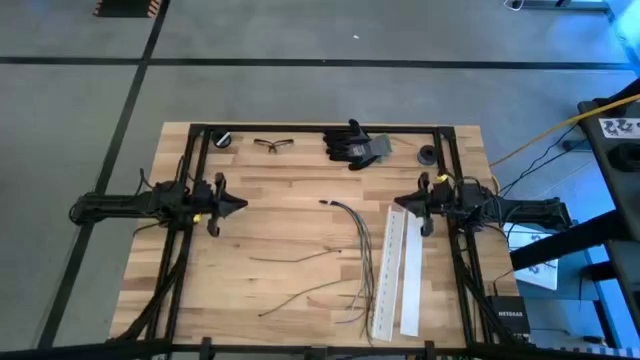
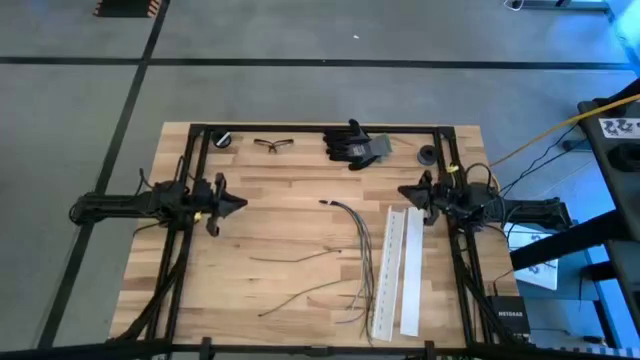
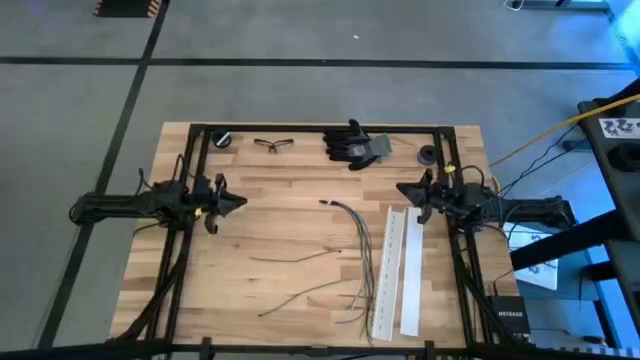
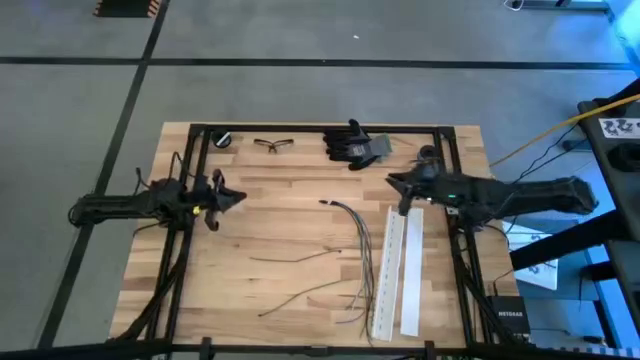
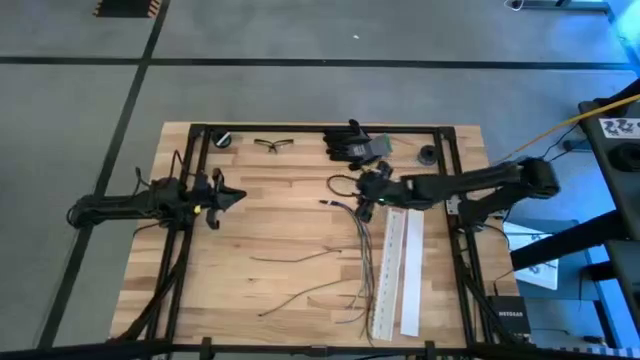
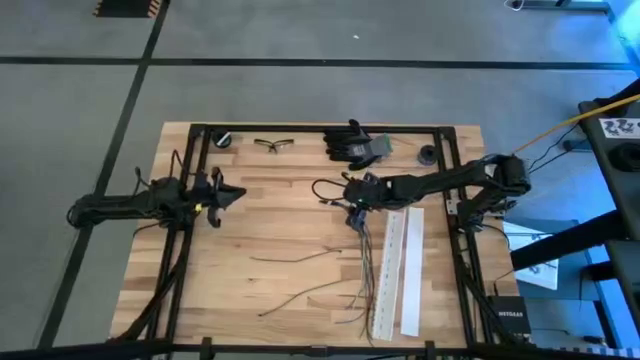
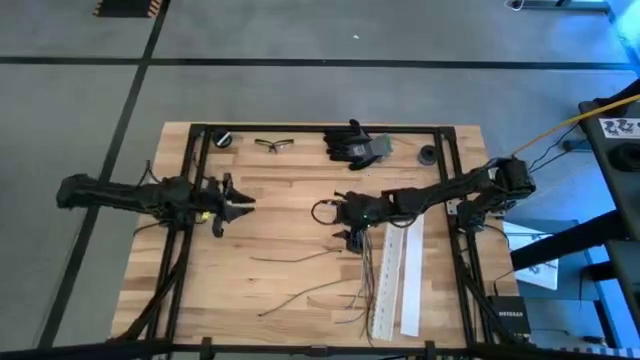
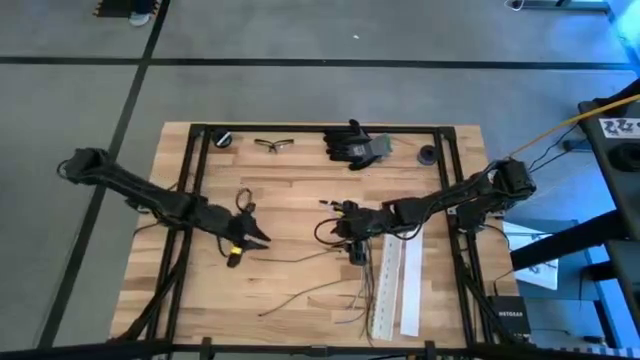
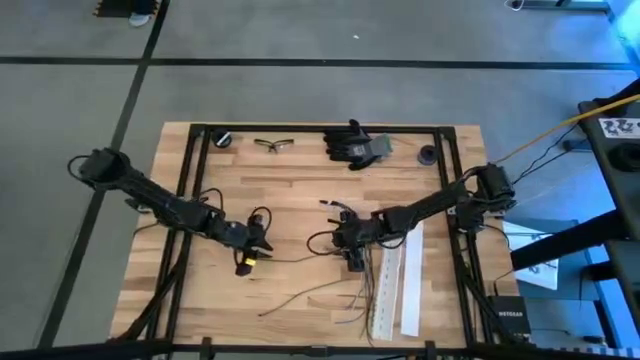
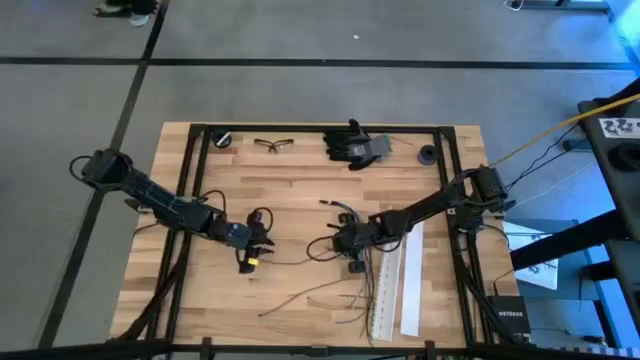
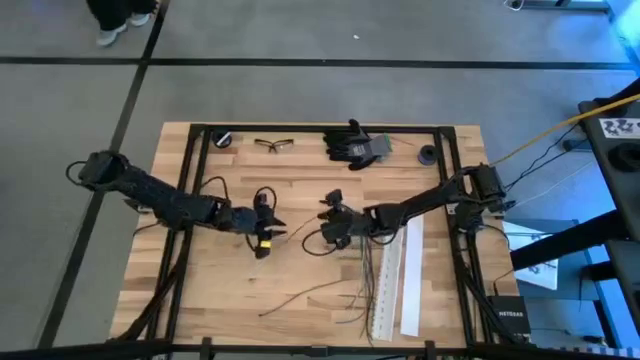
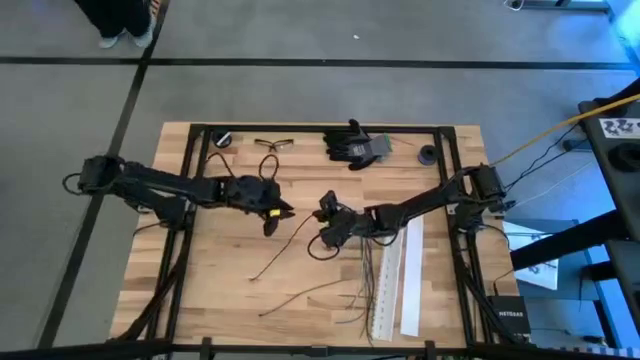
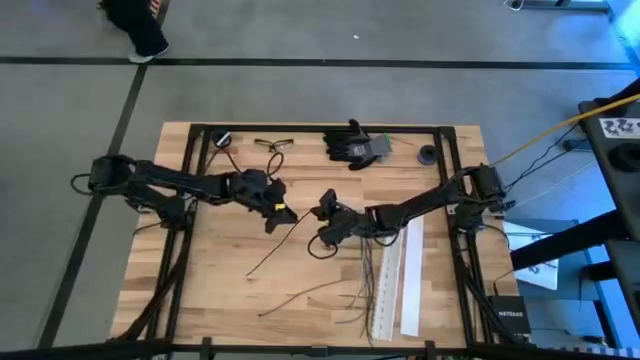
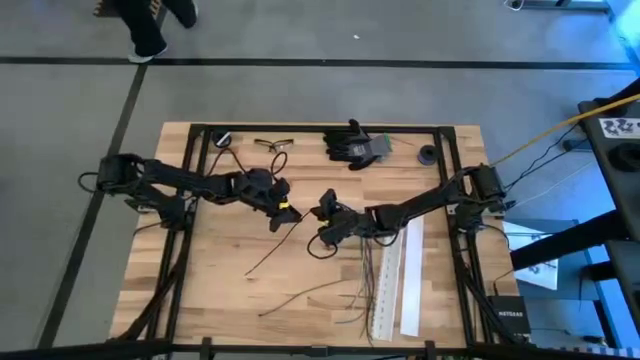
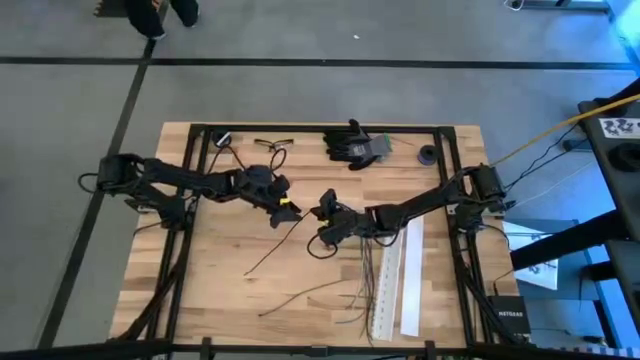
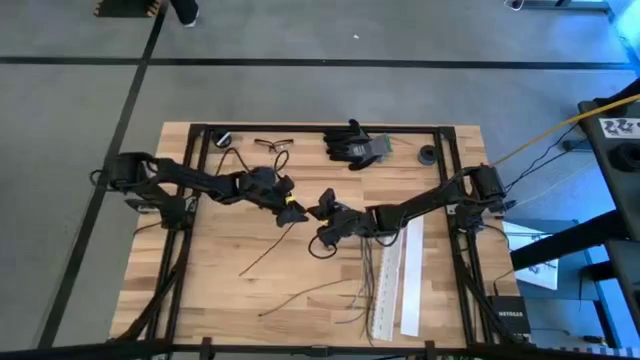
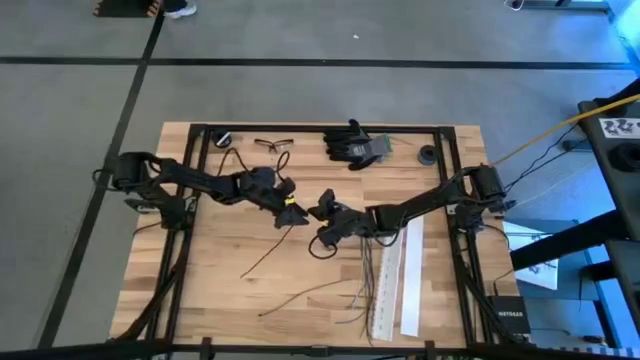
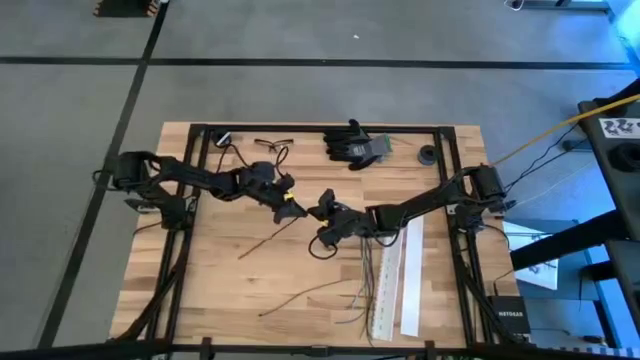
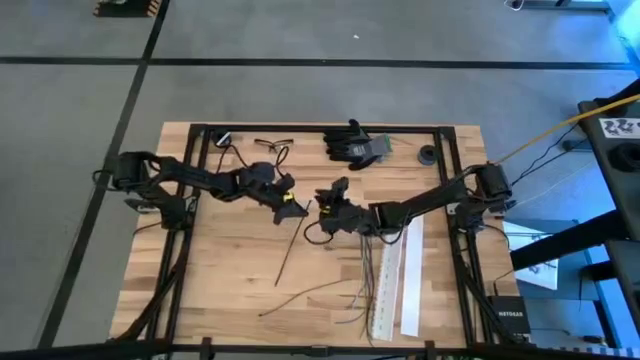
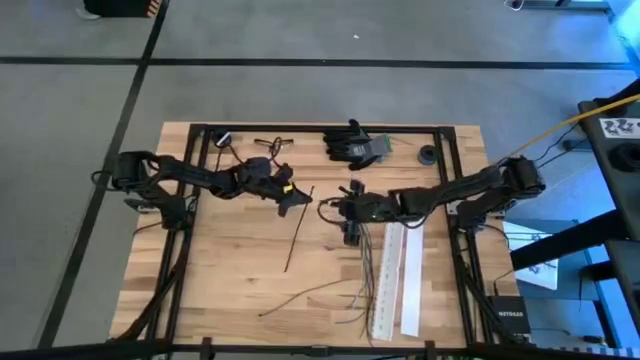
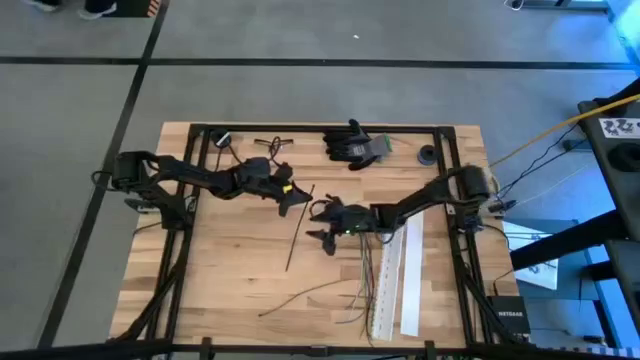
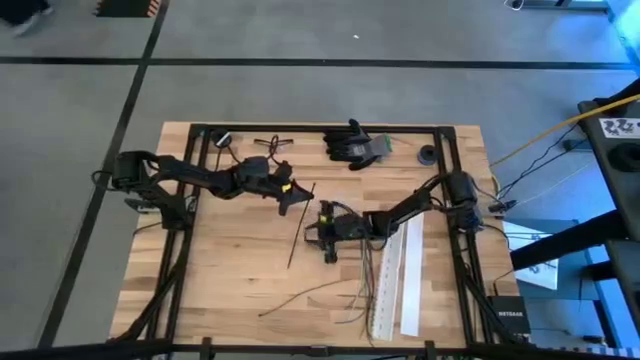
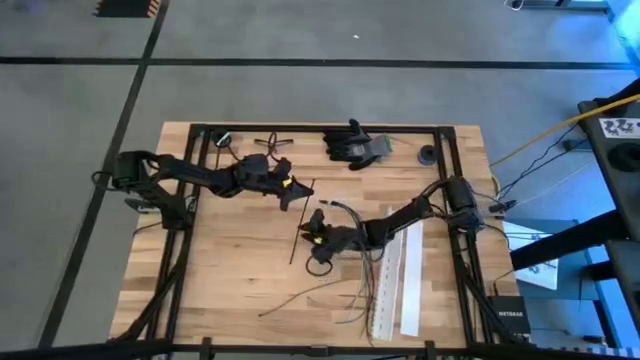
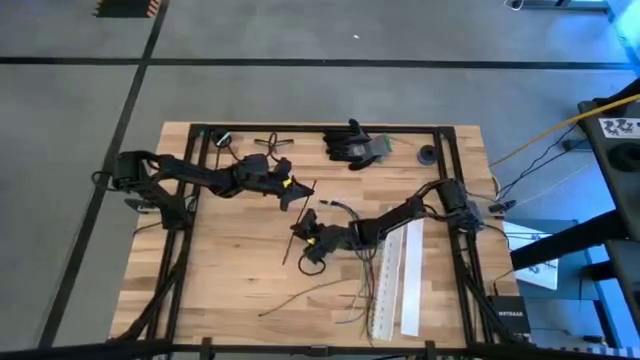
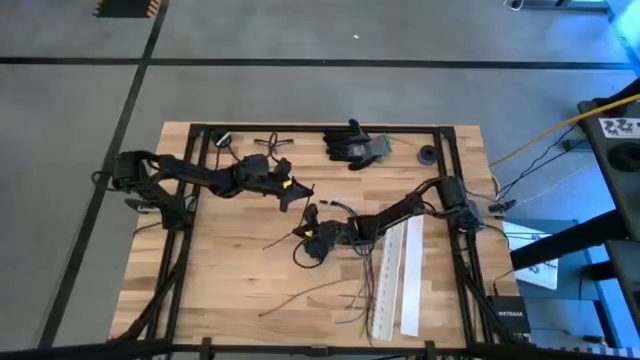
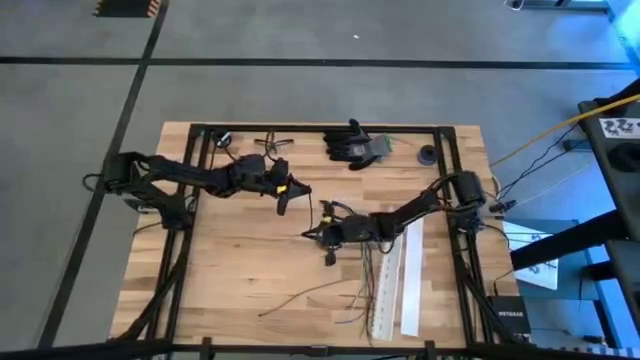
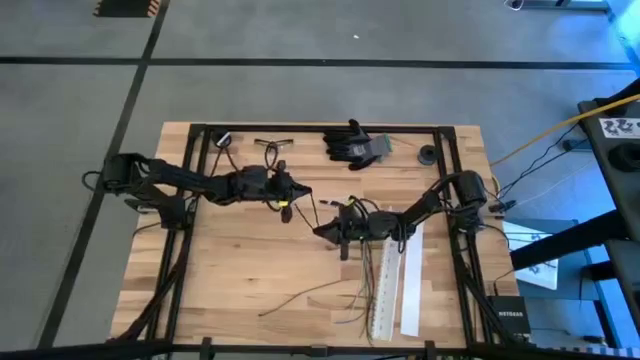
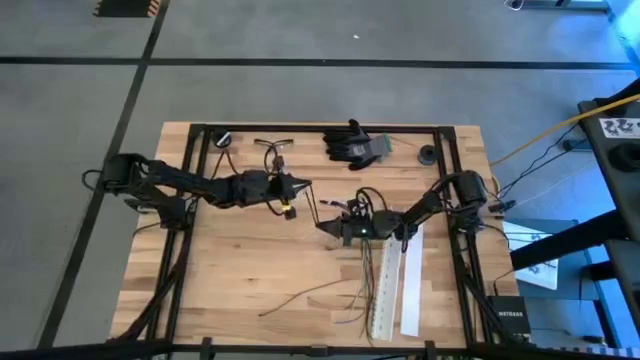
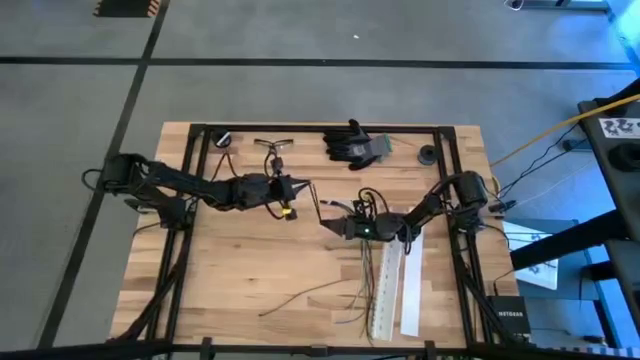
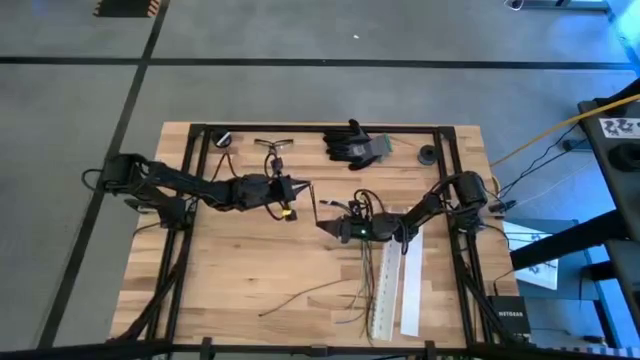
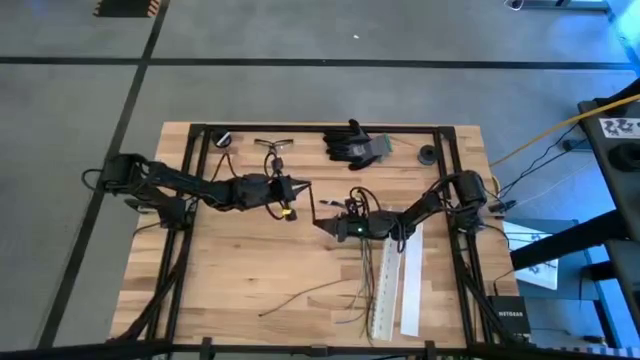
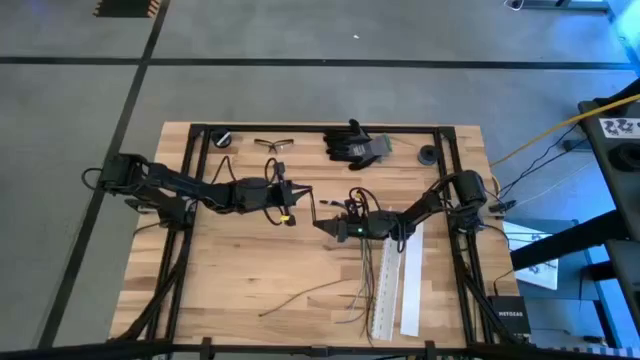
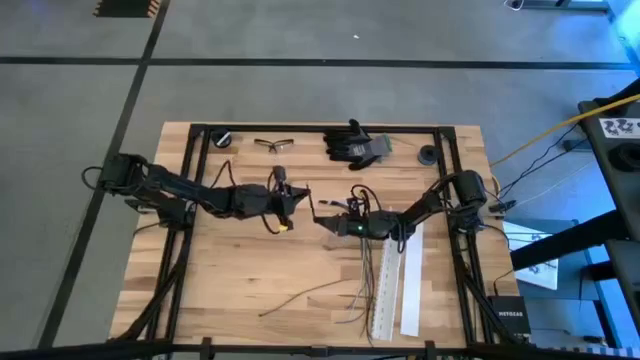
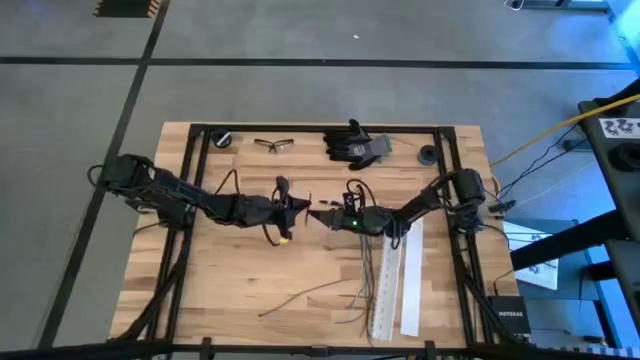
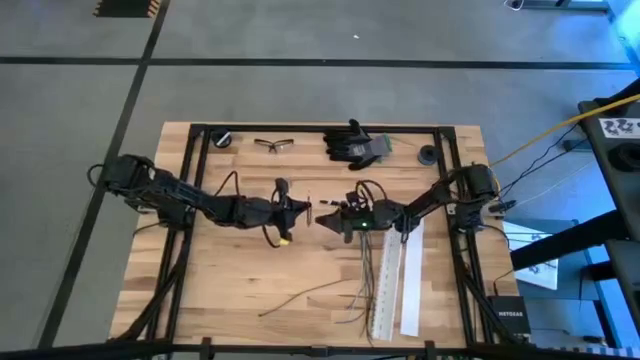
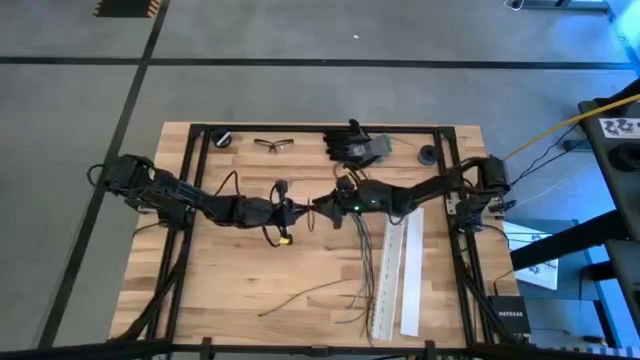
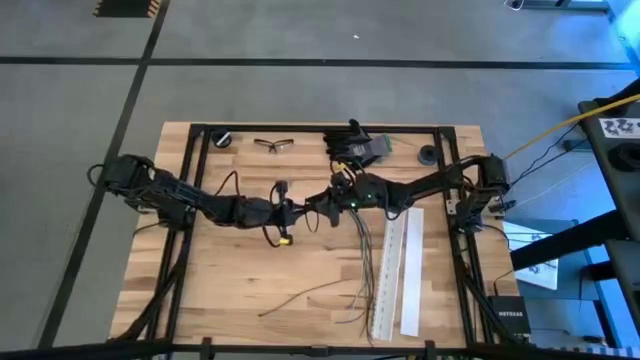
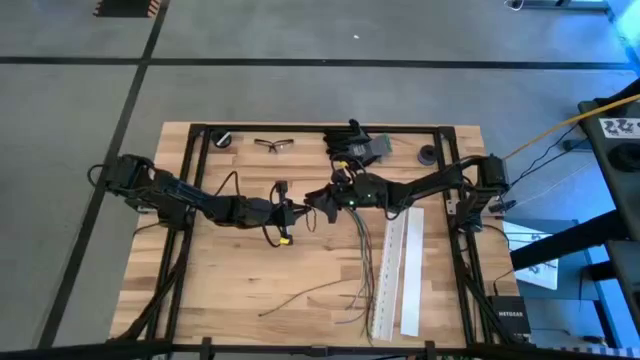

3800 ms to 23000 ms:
Task: Ziptie cables
Wrap the top zip tie on the cables
